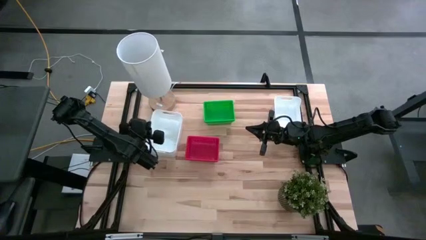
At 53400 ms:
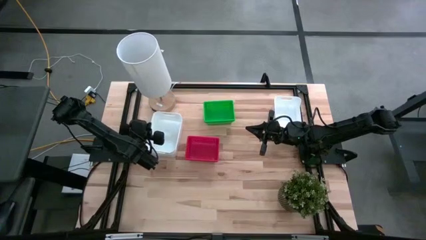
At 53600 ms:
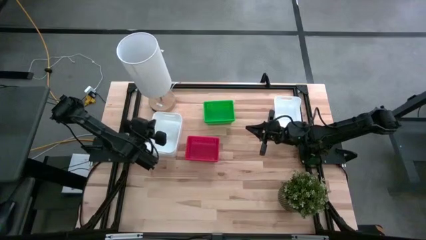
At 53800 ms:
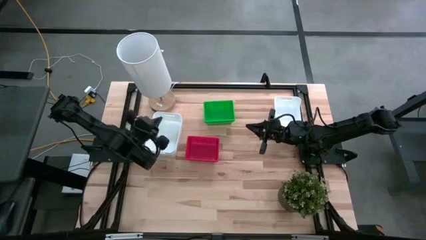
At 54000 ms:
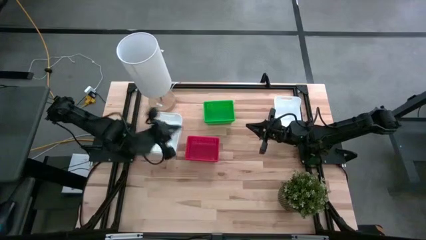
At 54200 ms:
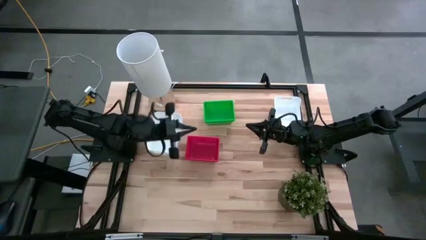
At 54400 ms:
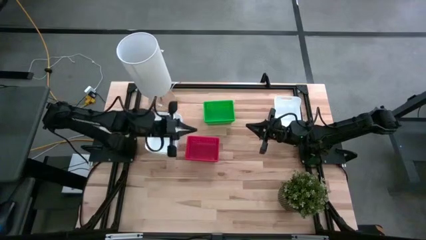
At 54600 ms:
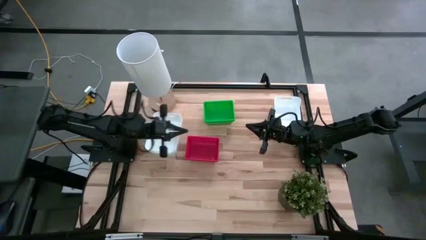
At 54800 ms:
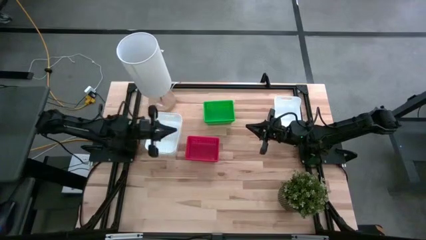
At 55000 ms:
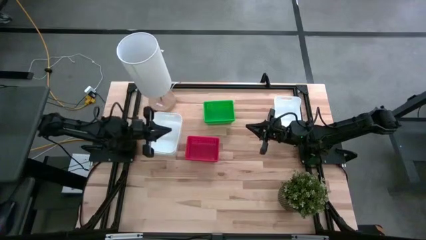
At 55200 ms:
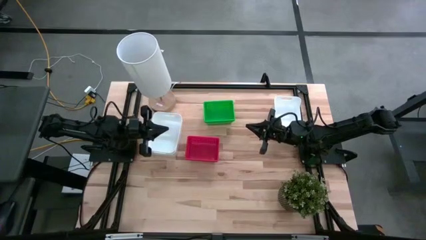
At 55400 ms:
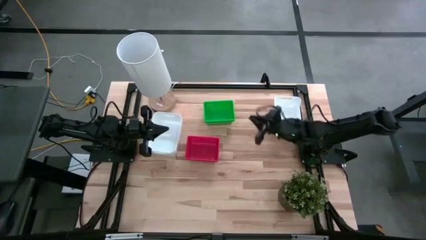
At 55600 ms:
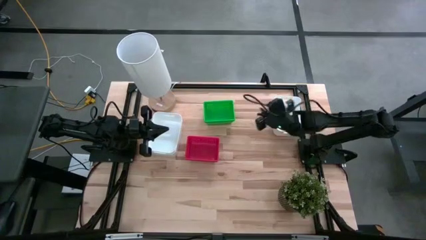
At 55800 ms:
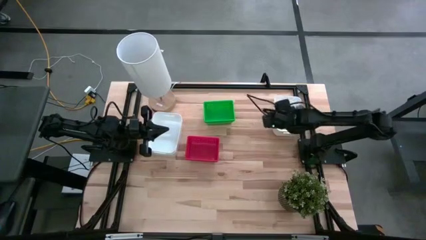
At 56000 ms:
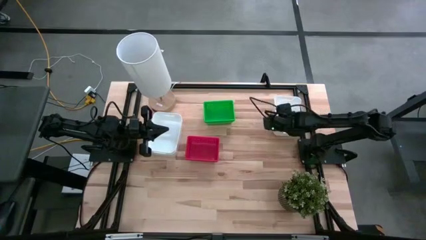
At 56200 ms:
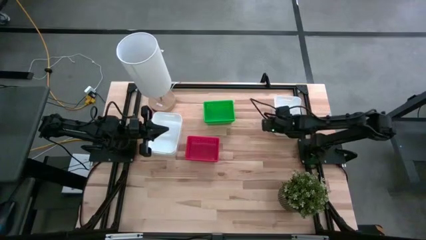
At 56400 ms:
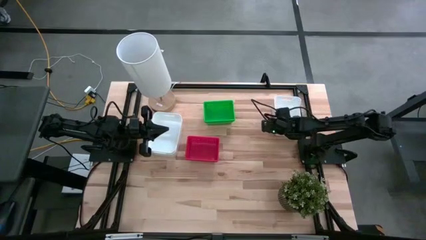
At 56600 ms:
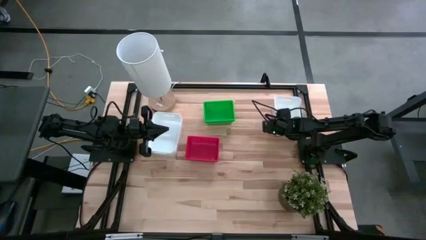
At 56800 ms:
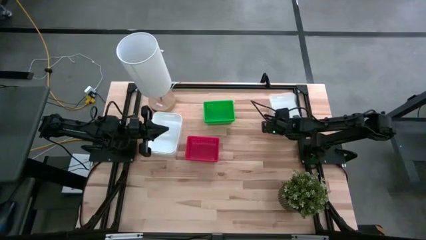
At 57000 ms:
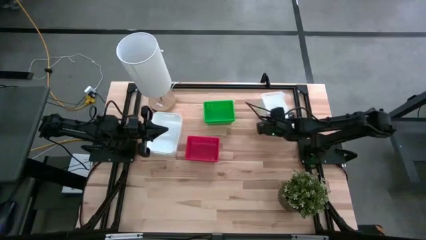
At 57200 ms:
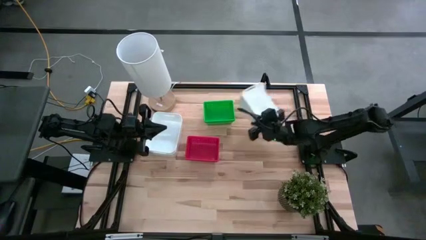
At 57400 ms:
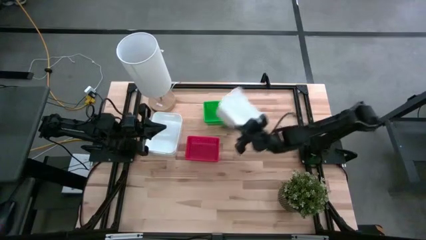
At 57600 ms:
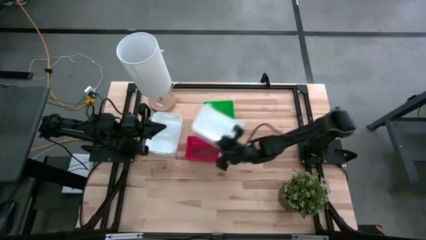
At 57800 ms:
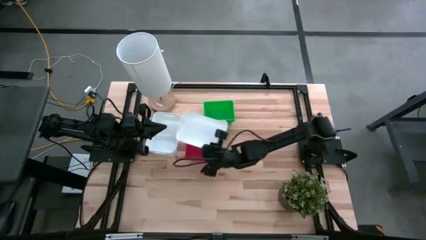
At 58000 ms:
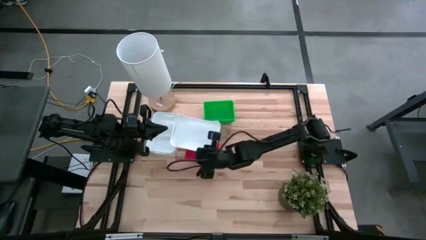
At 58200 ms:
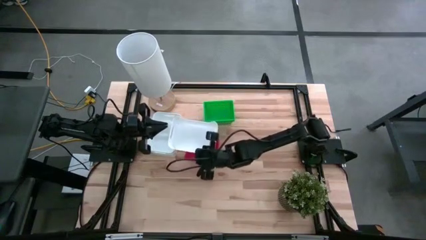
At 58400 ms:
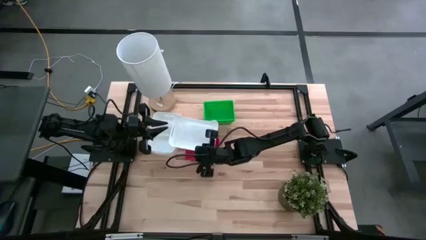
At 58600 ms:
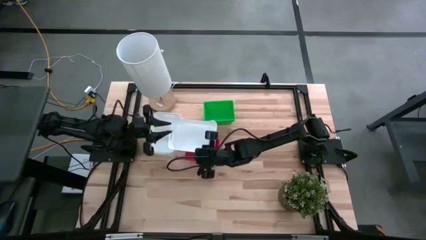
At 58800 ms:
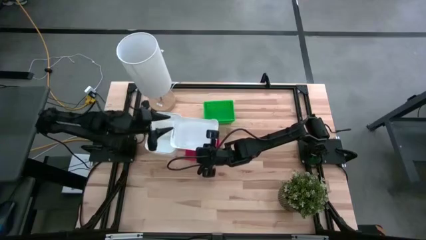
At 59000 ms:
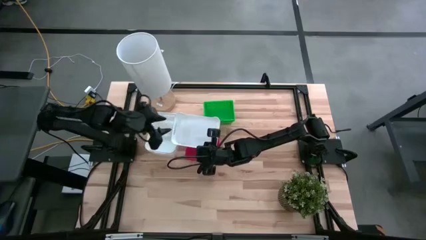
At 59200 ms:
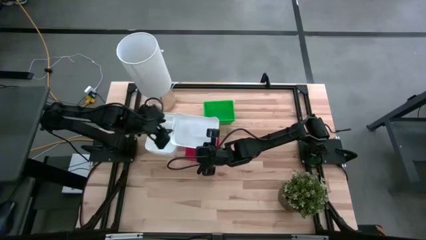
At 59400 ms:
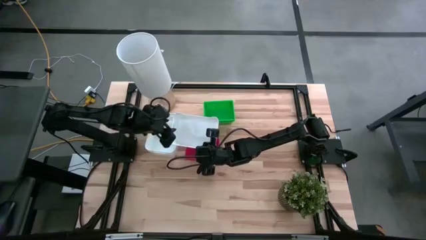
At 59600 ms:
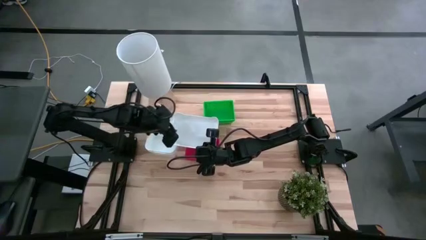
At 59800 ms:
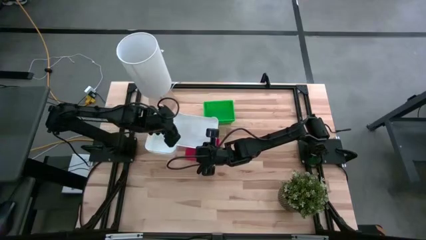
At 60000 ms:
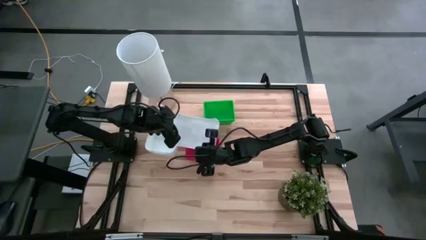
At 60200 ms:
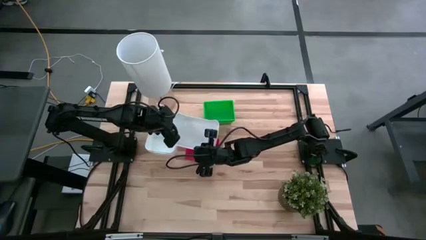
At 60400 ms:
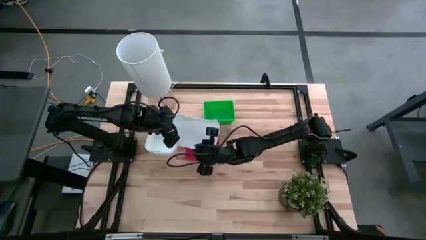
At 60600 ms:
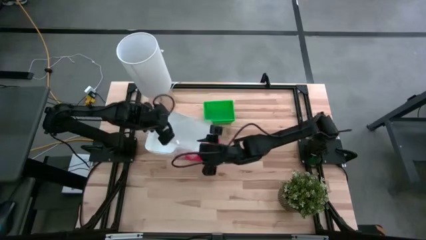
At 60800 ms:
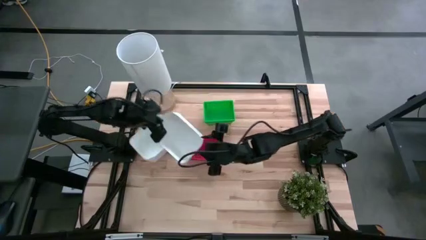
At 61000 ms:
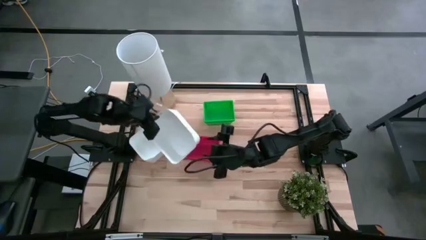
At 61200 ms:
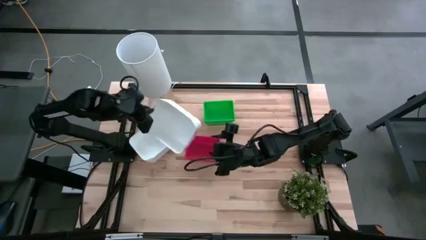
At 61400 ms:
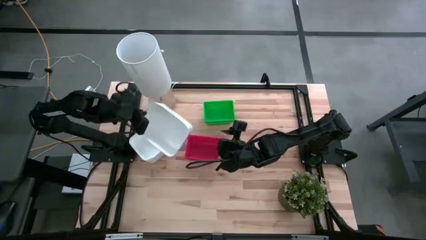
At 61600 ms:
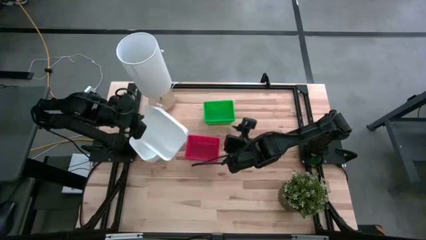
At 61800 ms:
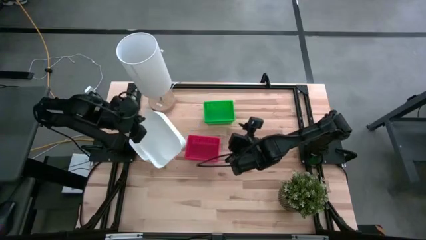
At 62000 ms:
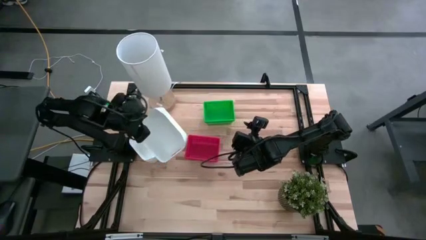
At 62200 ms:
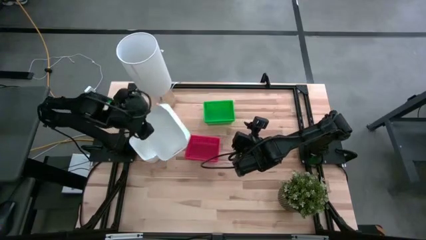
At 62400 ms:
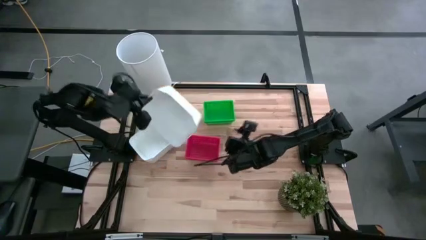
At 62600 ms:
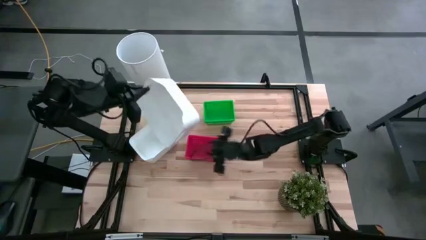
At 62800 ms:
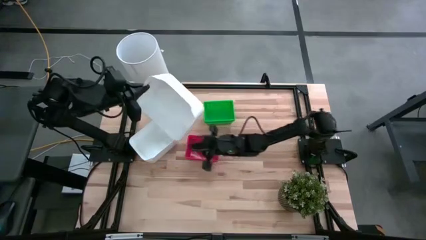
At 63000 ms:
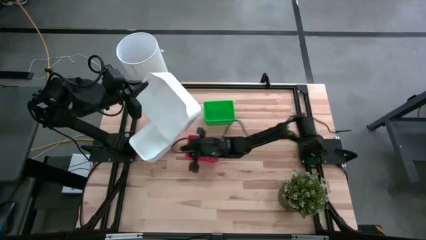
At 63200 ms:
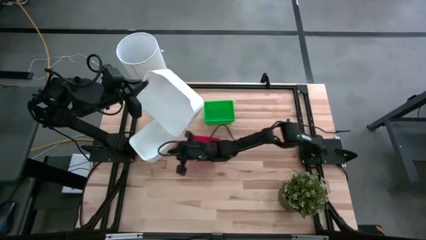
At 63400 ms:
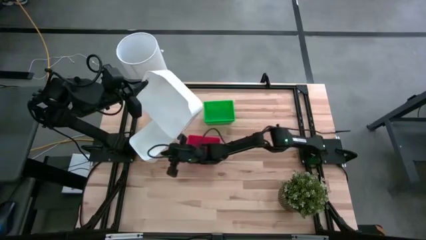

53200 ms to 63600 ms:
Stack the right white bin on the left white bins
